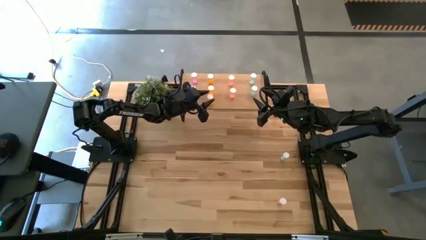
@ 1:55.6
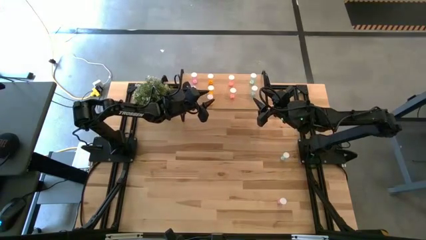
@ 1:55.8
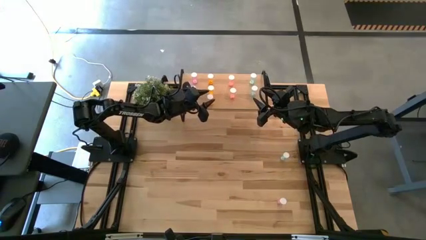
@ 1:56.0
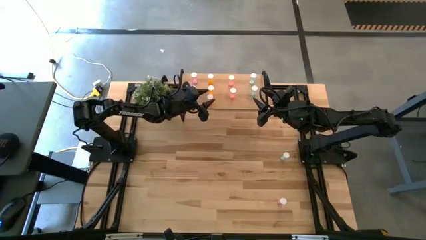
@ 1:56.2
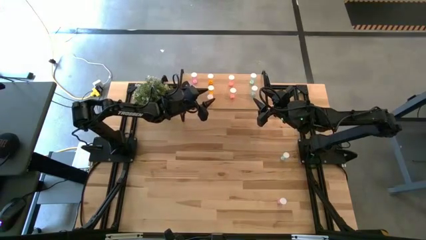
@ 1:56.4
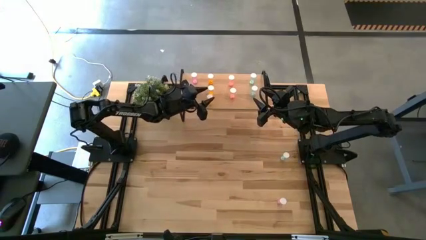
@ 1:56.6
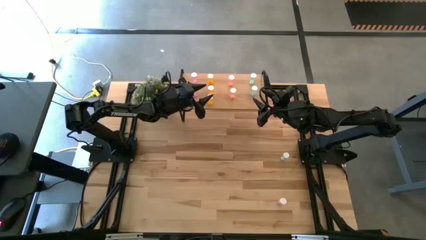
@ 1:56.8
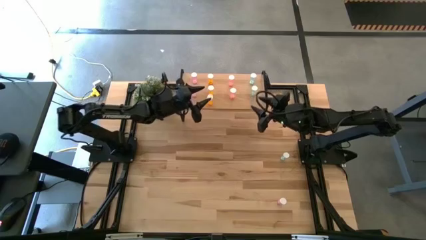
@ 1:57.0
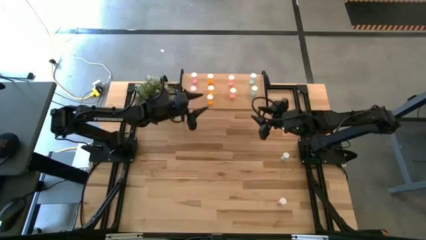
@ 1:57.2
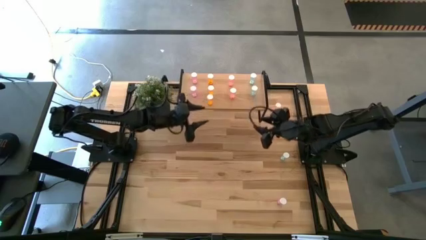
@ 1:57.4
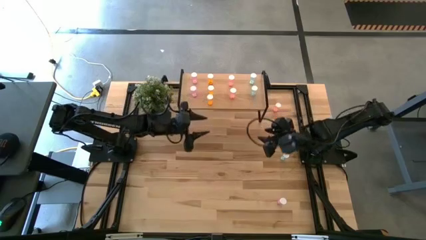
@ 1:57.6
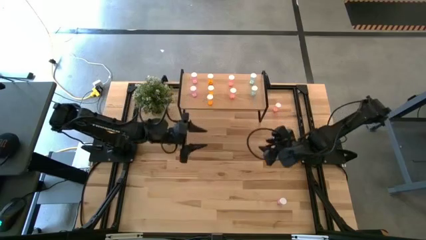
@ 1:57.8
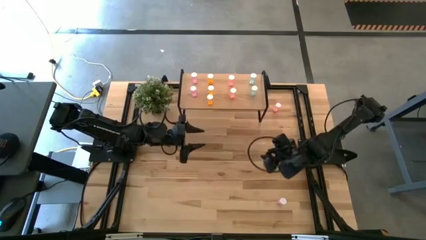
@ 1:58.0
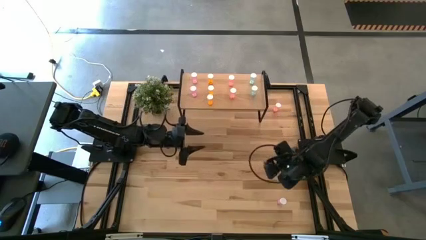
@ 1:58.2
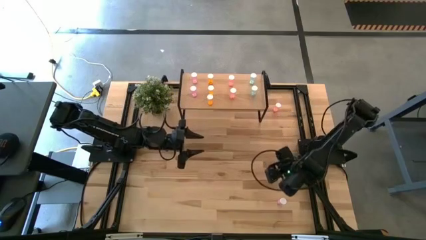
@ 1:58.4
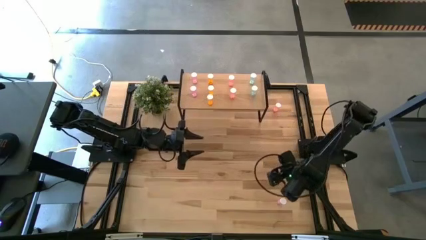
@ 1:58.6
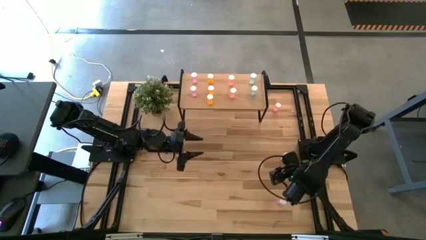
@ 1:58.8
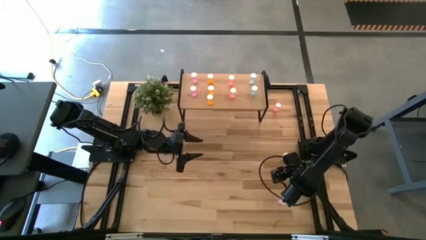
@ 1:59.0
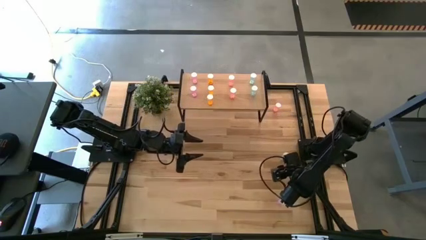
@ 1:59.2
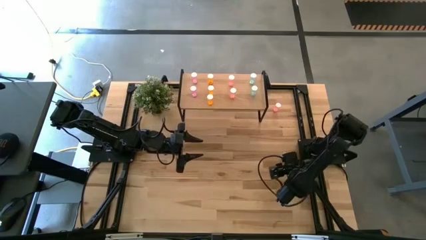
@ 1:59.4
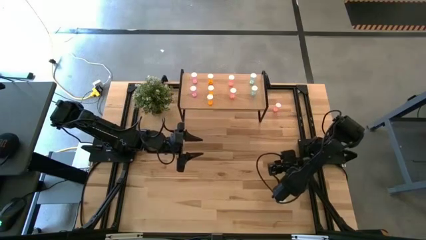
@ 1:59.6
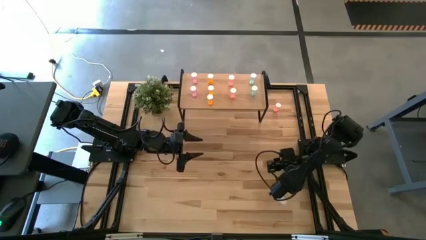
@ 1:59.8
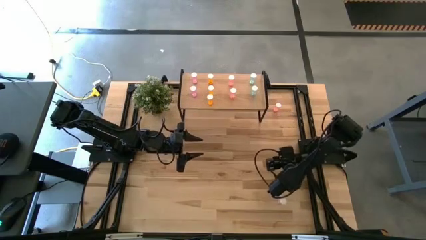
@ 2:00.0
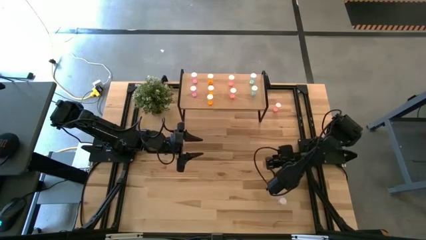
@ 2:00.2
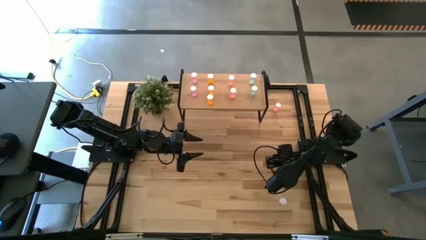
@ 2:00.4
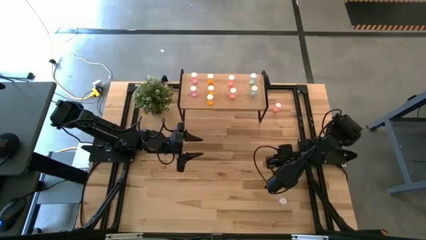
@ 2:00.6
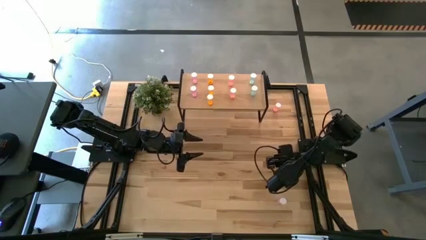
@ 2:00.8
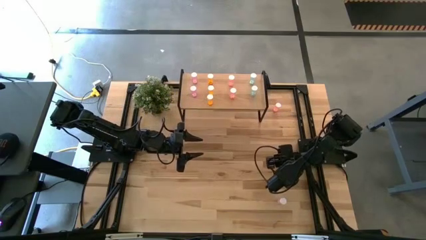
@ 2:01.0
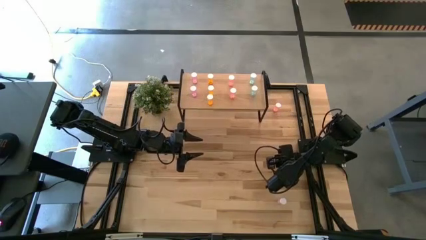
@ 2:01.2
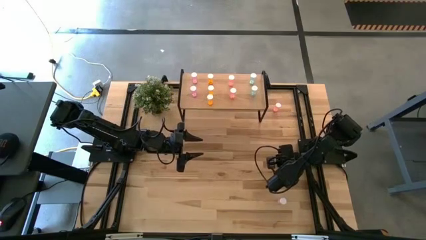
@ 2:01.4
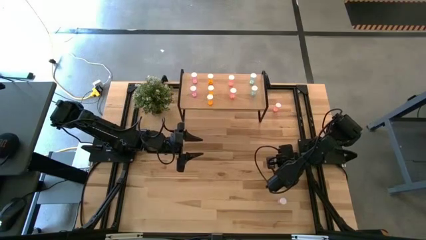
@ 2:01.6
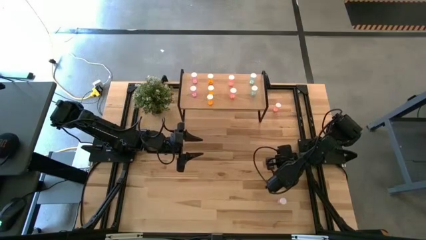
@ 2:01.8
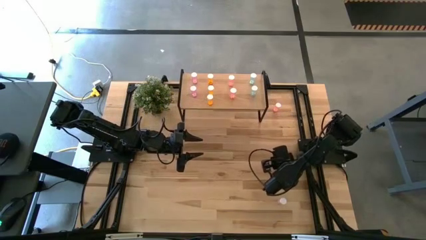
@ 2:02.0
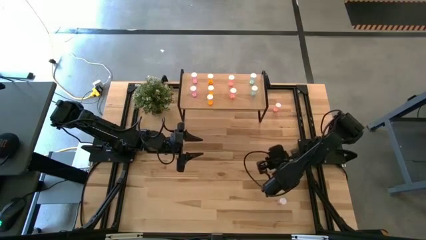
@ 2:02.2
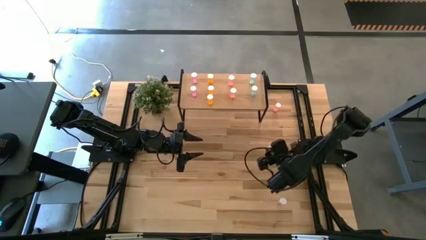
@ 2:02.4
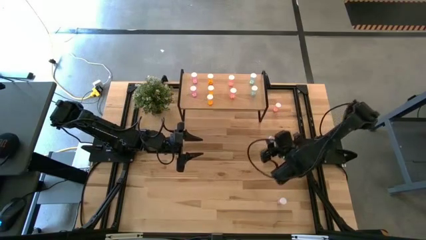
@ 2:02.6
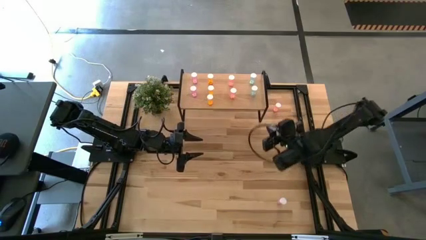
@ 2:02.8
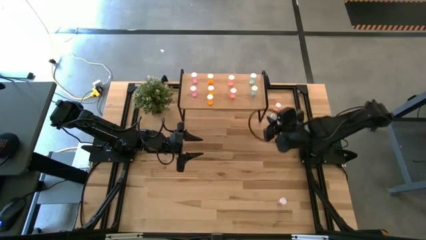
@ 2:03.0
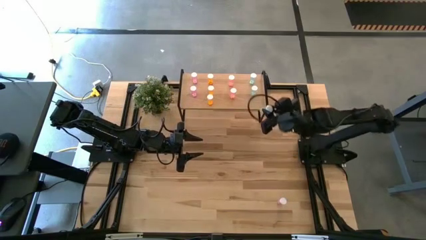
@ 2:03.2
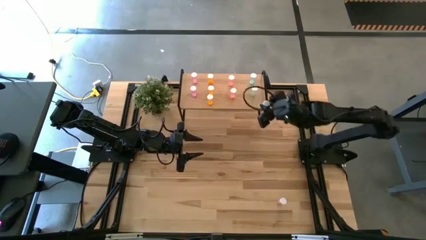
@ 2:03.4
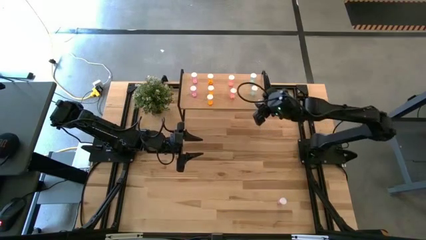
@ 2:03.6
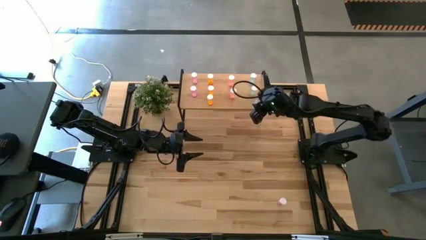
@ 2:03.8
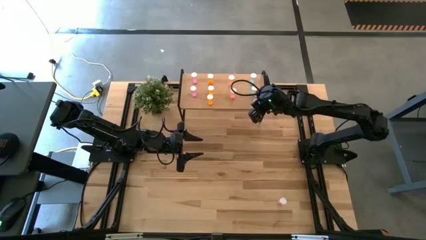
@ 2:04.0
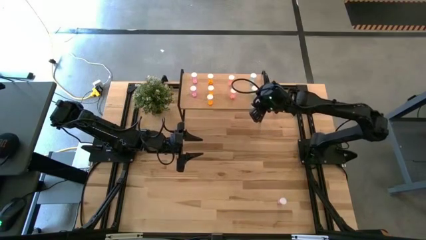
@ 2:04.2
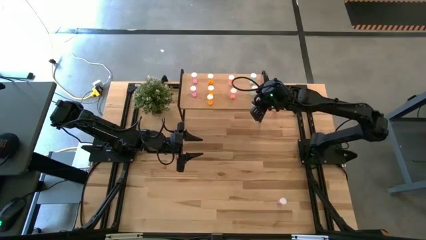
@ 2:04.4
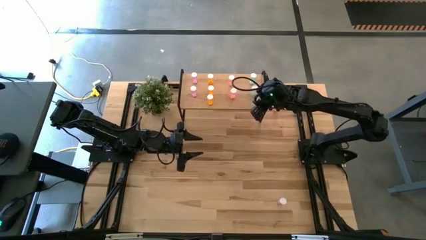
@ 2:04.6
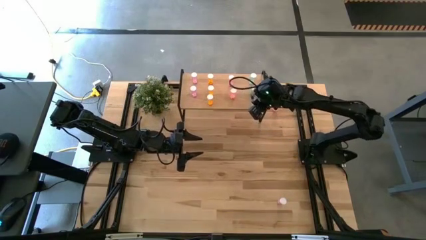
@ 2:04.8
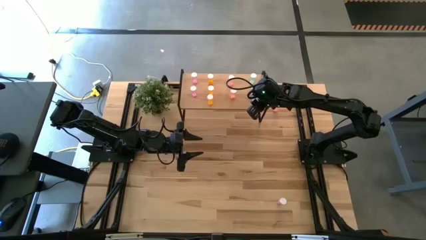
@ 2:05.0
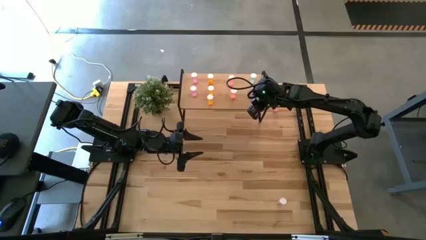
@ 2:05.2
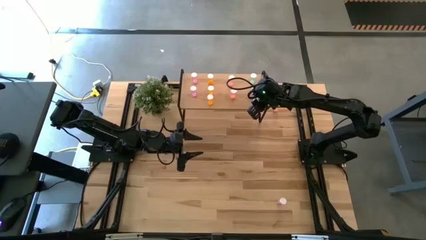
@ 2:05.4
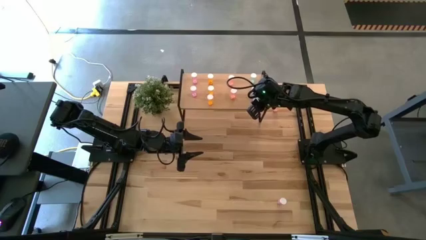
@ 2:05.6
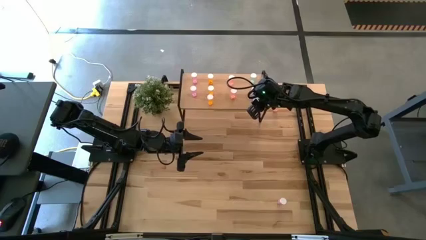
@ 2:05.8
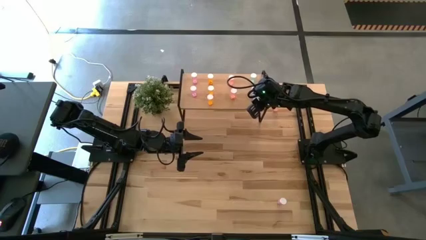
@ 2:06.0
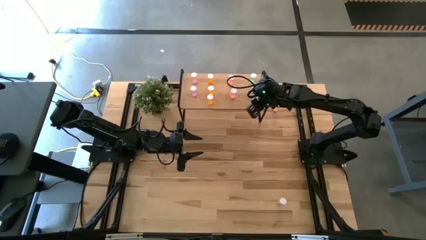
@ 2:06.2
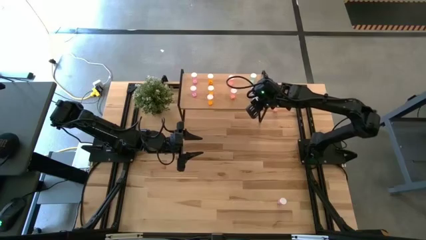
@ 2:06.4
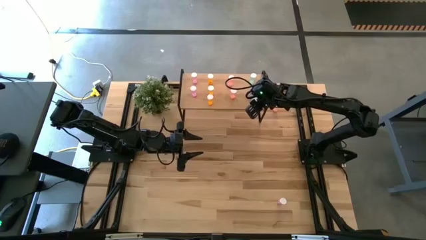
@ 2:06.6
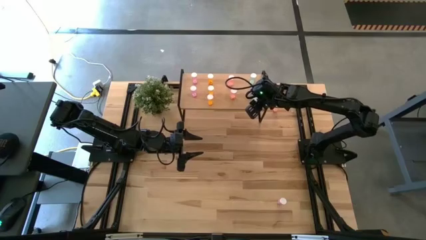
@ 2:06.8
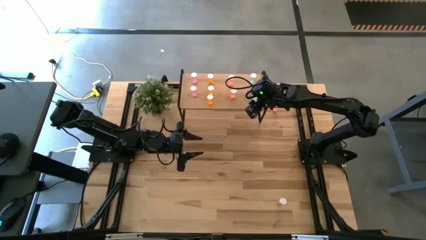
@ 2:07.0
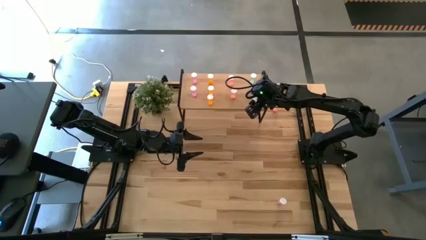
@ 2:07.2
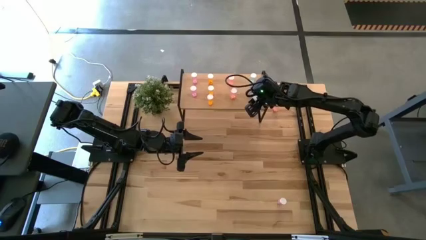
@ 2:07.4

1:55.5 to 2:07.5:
Task: Pick and place medicine bottles onto shelf by color
Put the blue pill bottle aligned with the other blue pill bottles on the shelf
